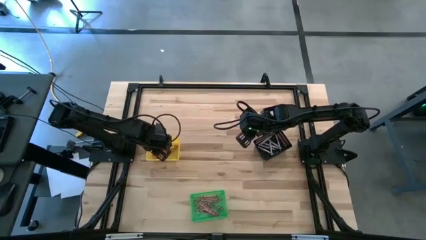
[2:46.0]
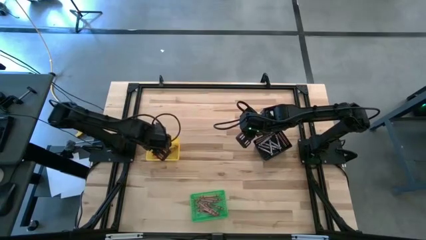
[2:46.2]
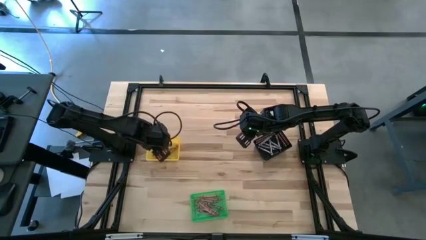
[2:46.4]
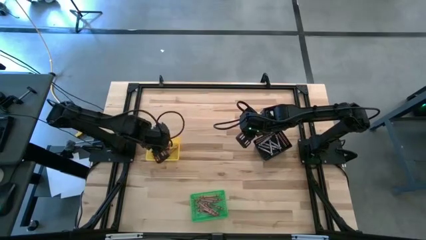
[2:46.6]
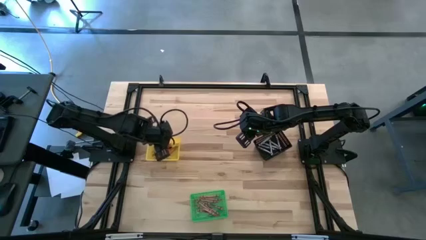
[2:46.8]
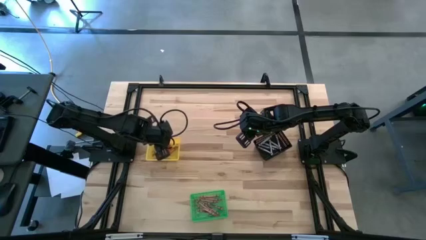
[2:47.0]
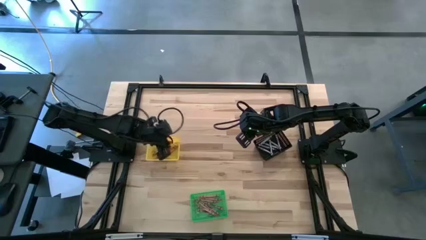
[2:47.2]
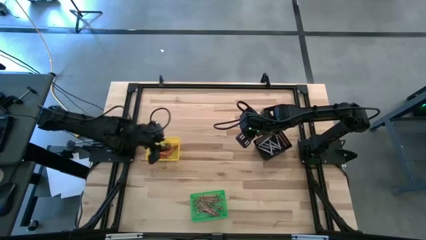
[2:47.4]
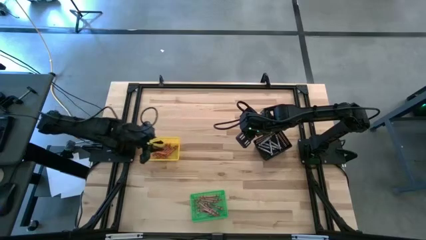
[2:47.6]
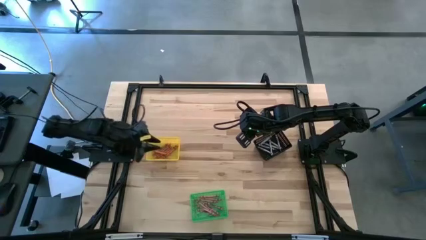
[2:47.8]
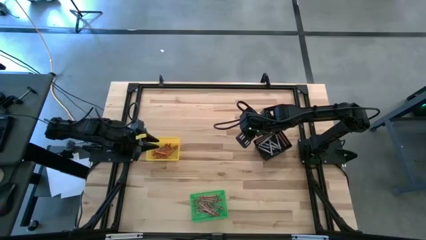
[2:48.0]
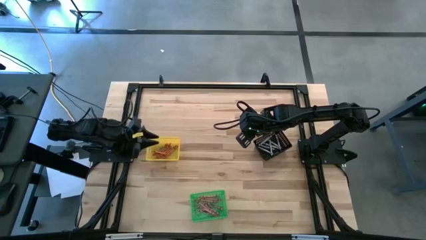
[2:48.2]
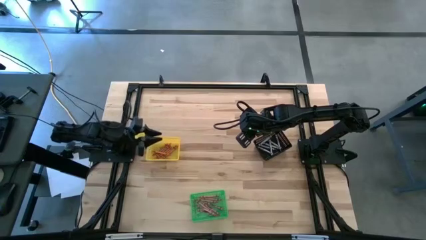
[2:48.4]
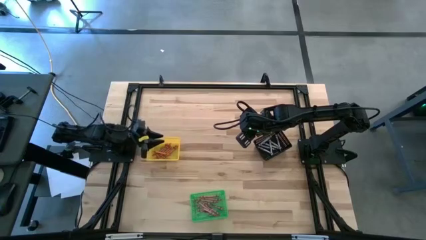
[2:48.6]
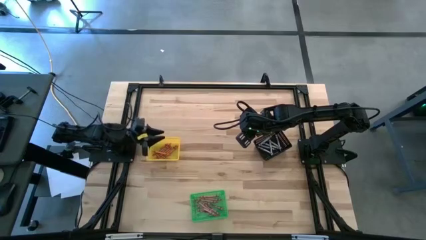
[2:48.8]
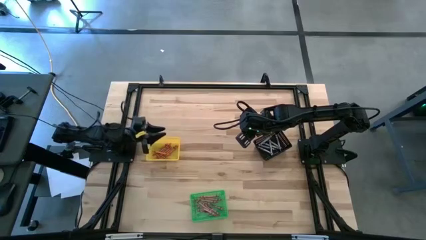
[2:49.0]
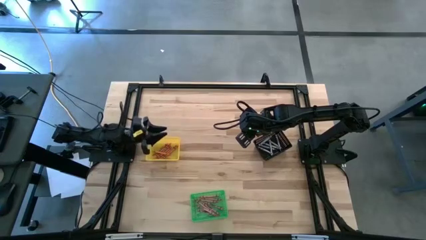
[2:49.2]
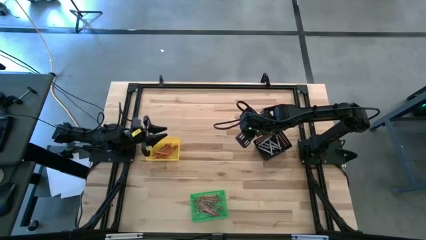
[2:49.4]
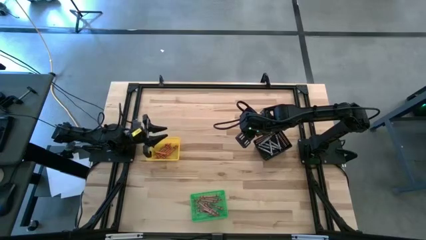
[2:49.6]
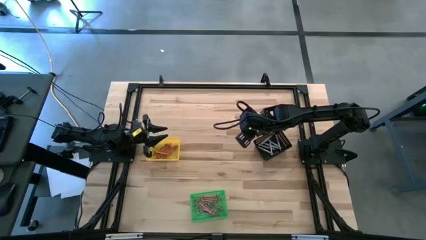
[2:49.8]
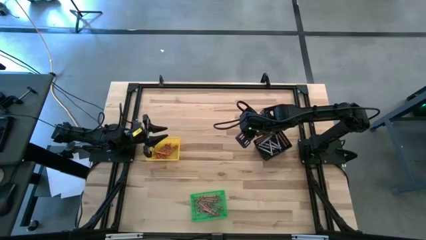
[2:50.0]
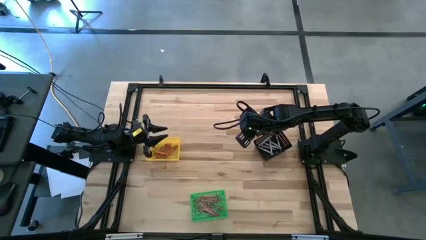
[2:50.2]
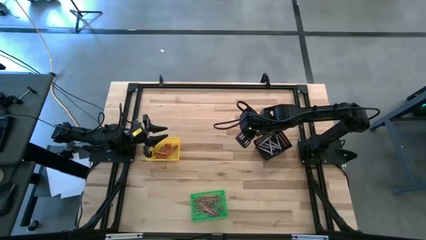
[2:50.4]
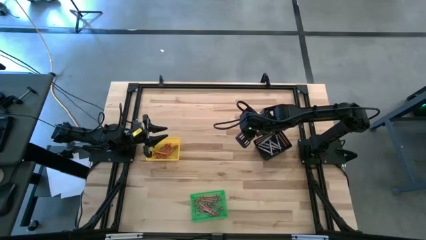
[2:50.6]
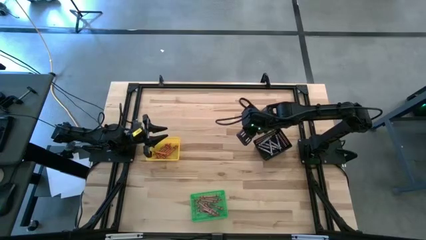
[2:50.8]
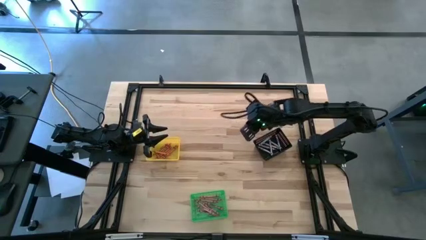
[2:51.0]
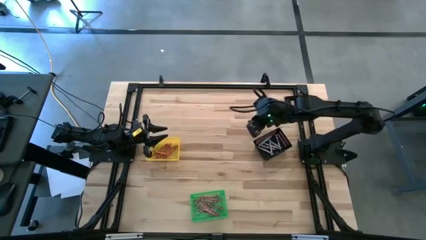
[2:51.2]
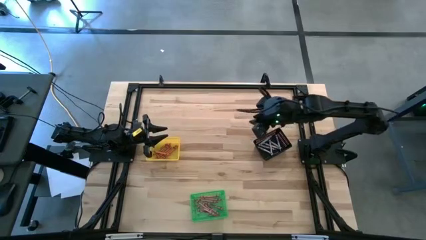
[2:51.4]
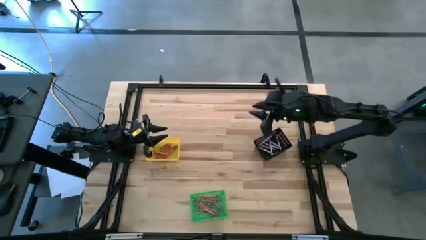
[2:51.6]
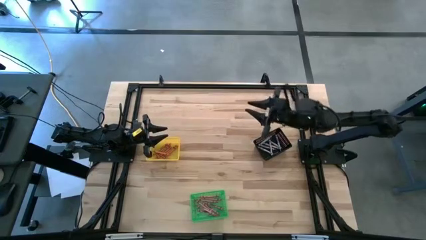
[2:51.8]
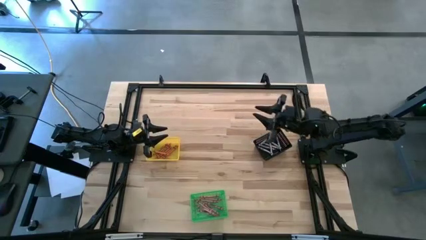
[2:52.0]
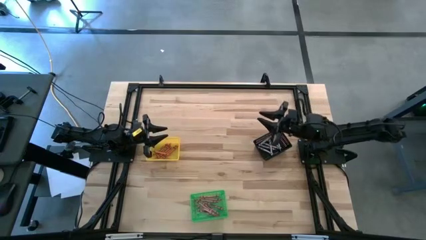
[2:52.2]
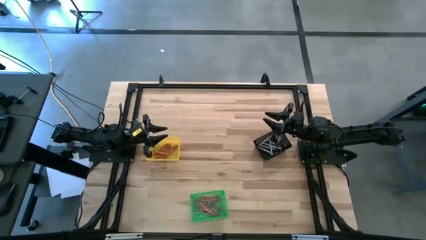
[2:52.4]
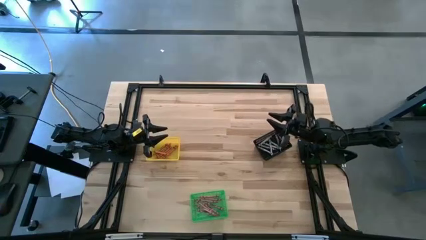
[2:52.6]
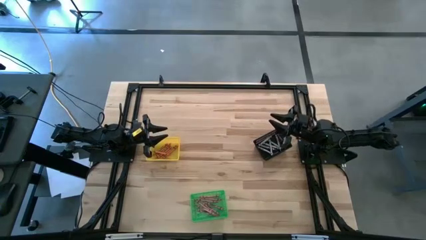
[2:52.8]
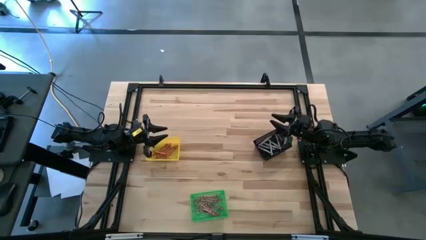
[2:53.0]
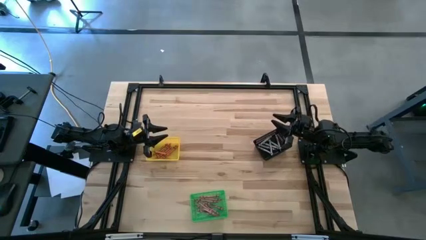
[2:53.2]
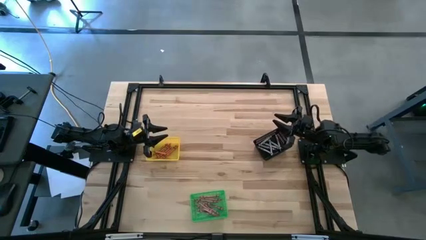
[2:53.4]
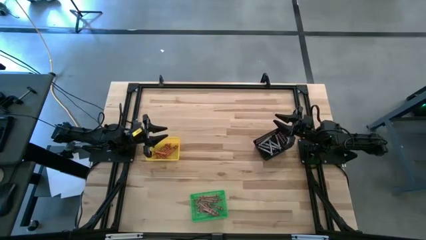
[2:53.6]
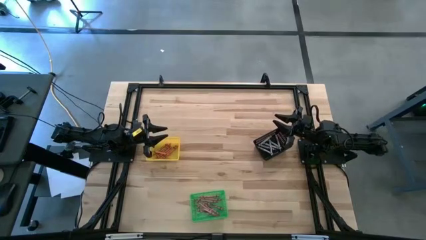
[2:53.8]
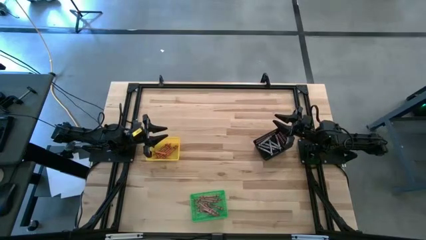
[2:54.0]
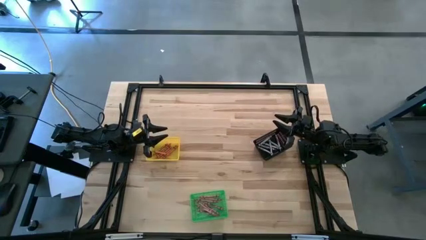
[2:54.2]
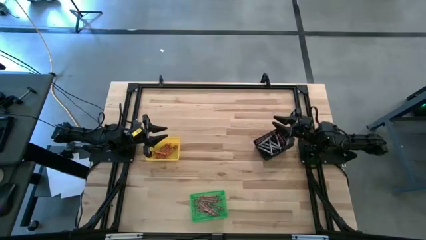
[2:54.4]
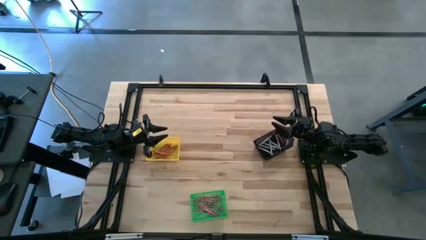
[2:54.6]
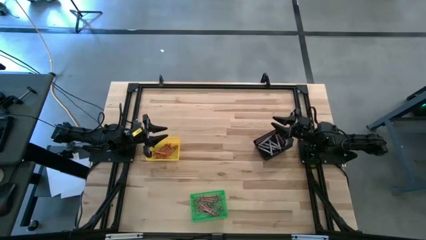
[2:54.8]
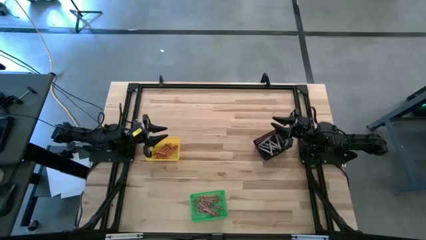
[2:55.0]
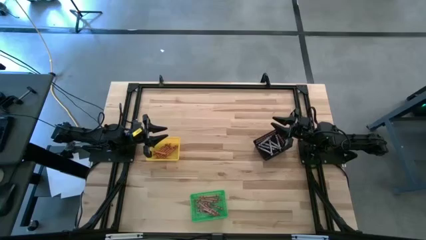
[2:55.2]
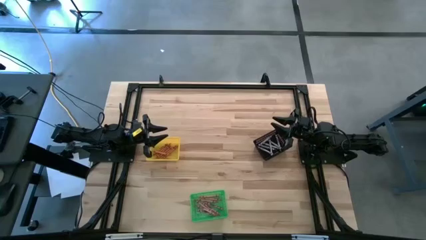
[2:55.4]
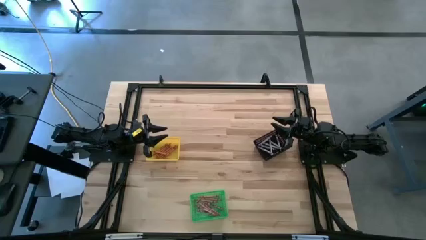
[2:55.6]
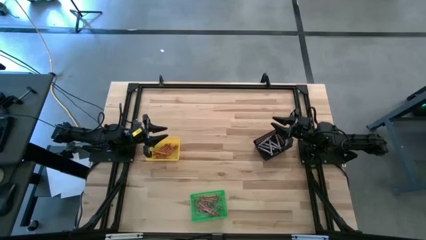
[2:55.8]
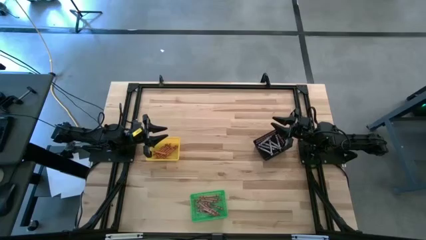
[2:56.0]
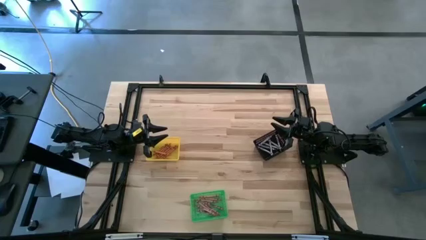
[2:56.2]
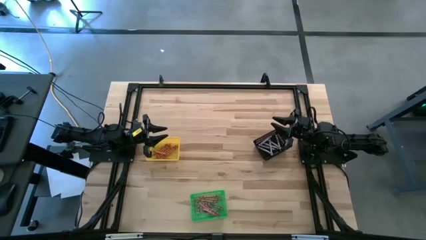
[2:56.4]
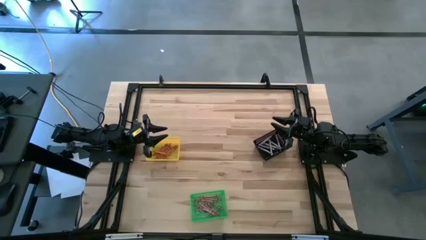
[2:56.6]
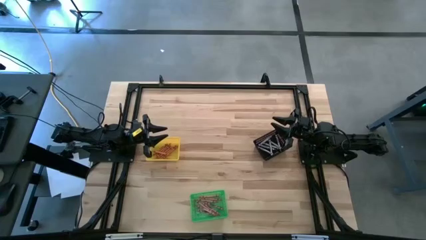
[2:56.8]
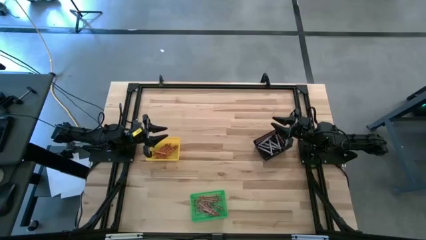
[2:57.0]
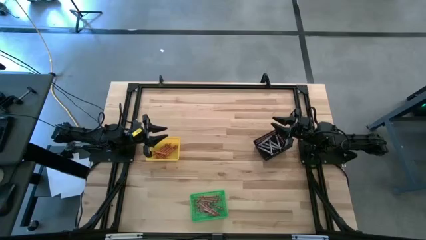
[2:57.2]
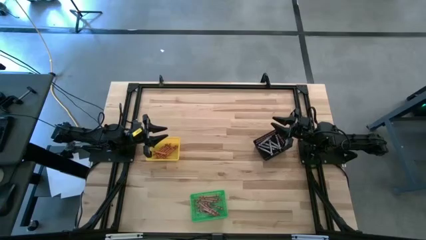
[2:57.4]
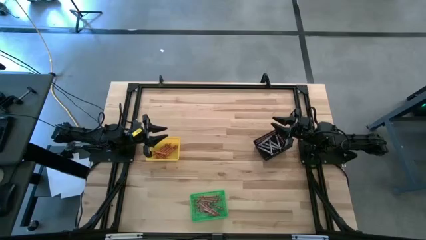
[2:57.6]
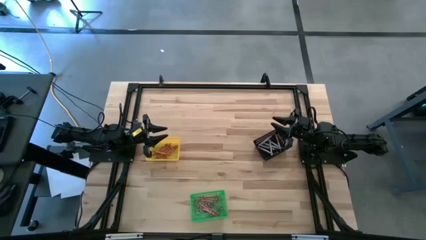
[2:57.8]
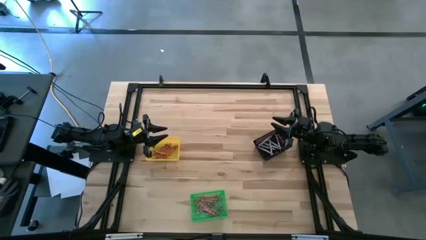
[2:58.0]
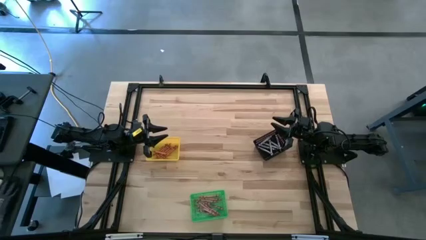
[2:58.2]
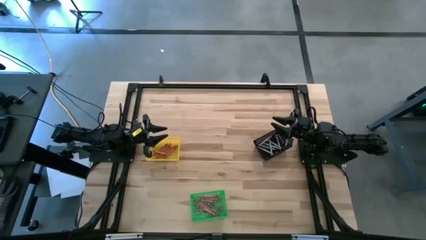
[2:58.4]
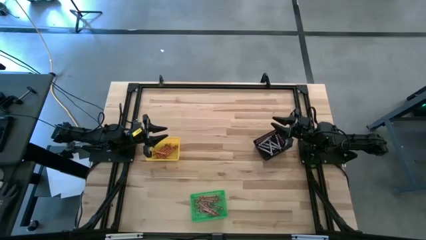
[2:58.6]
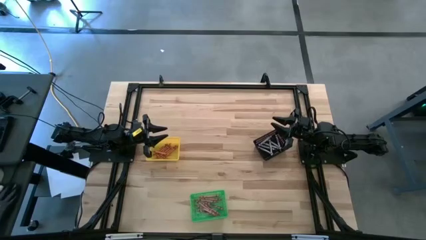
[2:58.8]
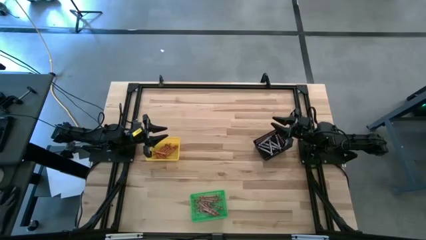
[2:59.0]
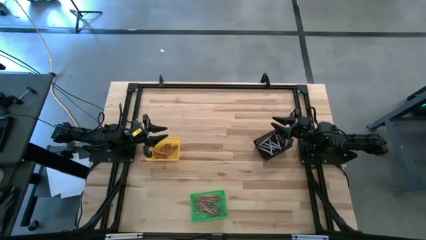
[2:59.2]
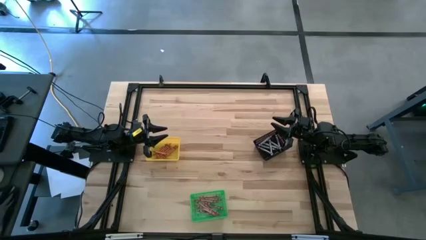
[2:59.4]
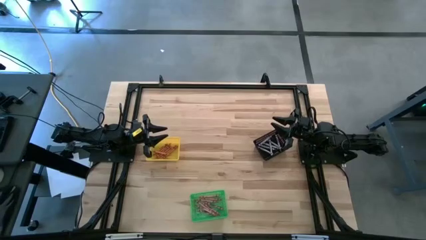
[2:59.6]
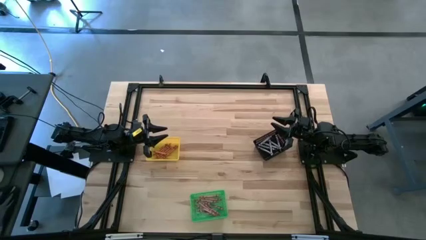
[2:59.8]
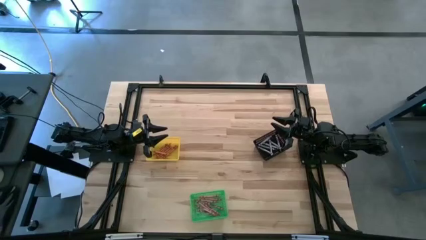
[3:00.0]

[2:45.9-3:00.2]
Task: Sort crayons
Return to Home Position

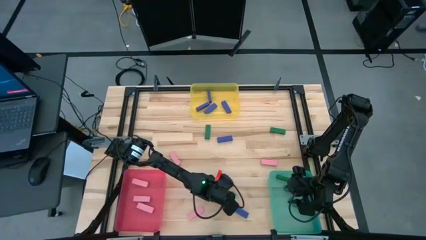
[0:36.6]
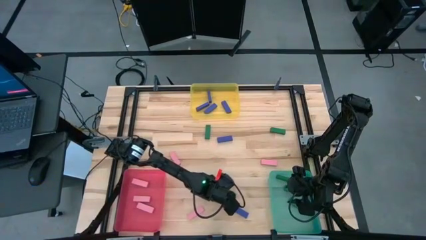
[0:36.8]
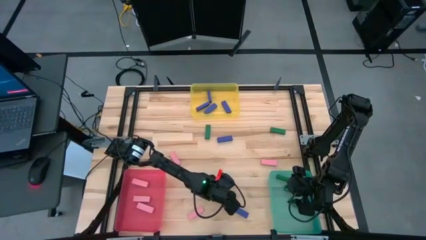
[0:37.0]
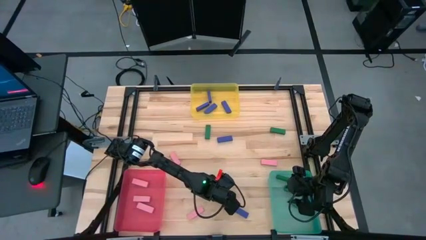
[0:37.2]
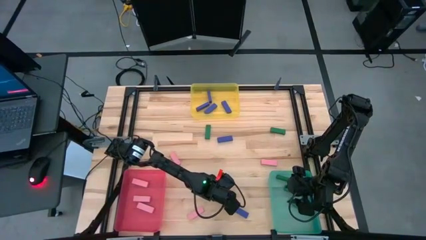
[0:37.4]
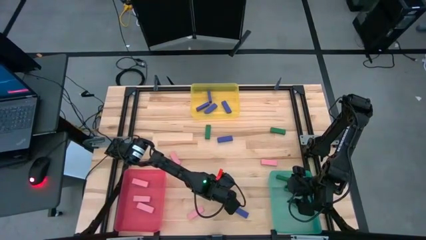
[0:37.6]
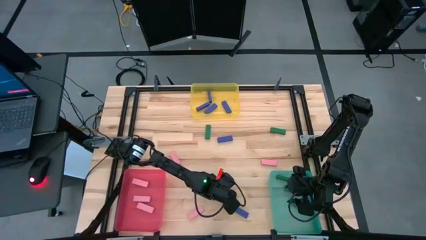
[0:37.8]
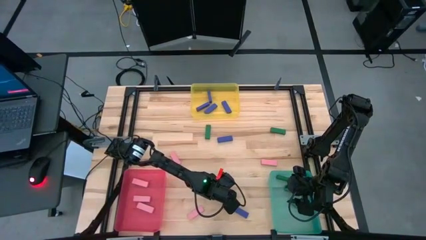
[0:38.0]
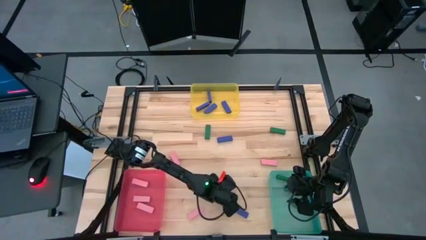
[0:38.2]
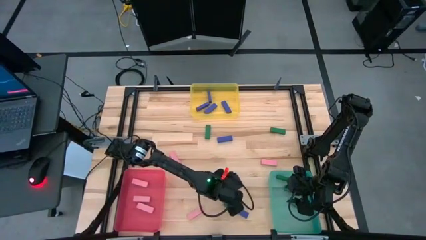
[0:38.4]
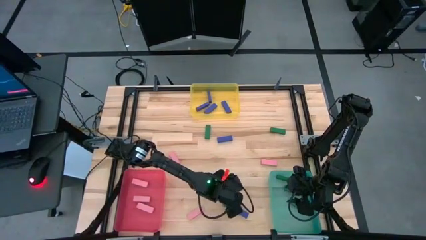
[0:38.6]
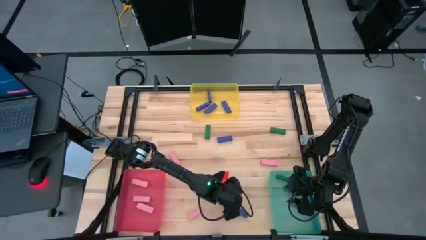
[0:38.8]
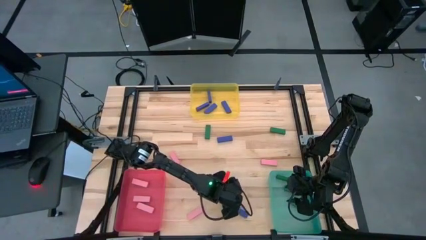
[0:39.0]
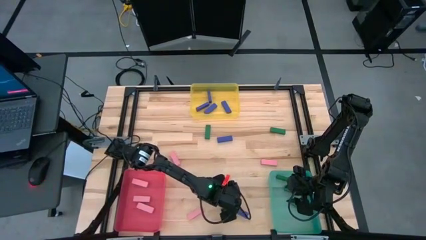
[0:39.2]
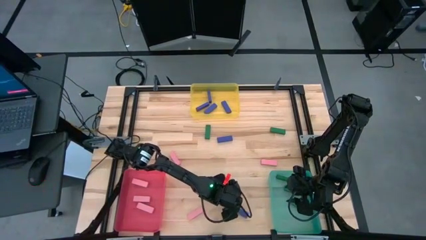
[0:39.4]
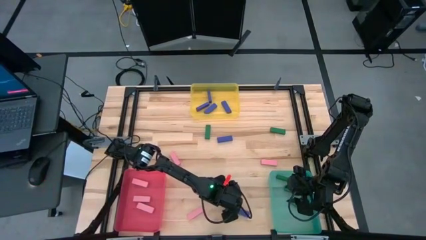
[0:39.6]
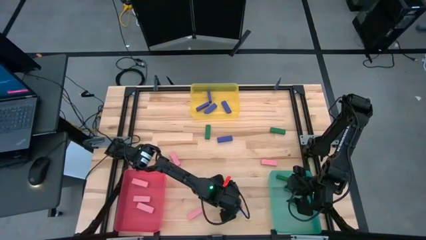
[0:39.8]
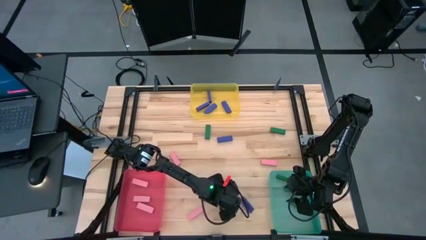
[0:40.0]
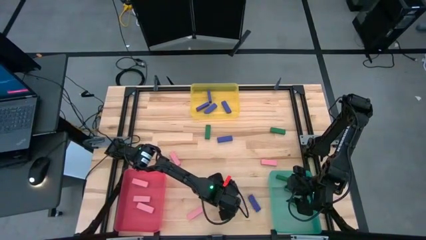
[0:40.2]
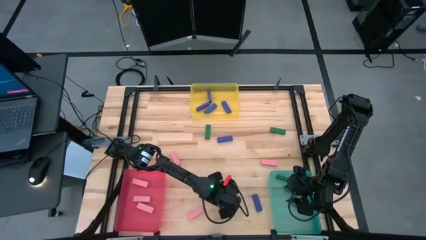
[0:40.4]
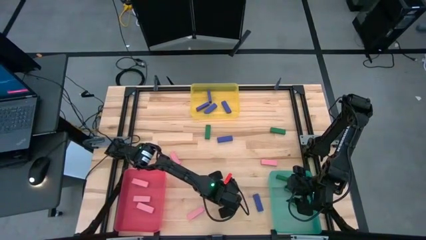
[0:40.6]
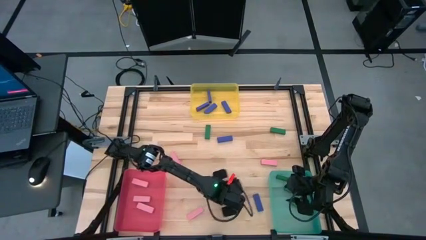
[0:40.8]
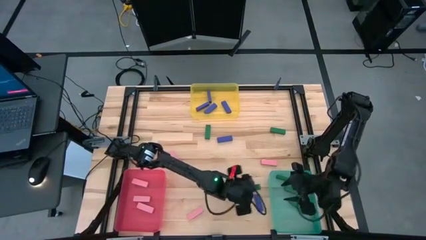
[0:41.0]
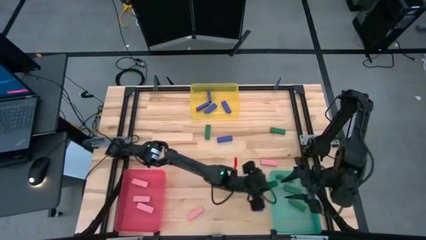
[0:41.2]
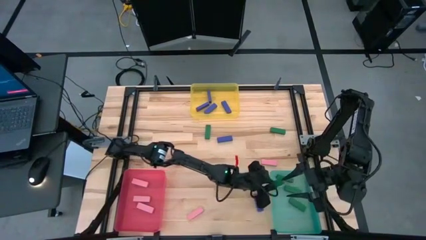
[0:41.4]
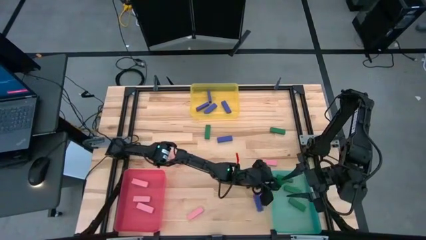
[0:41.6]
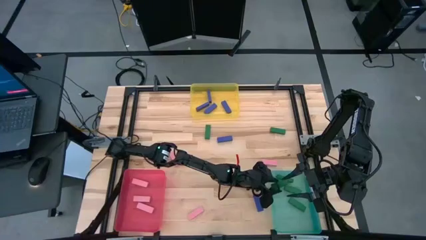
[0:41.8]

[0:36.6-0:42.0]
Task: Sort blocks
Put the green block into the light green bin
